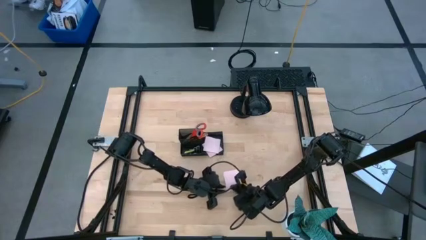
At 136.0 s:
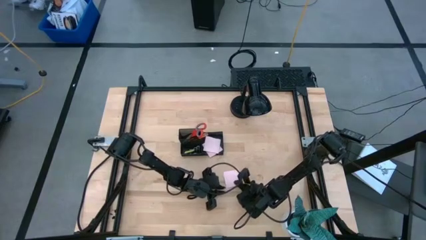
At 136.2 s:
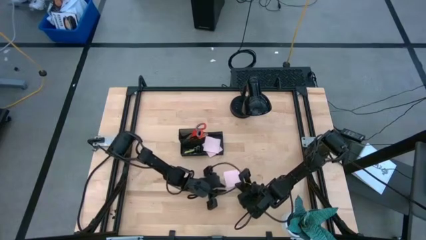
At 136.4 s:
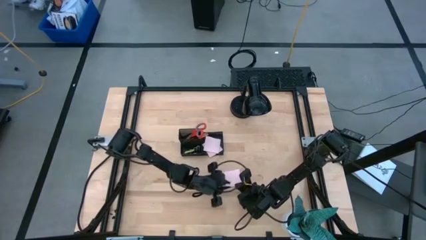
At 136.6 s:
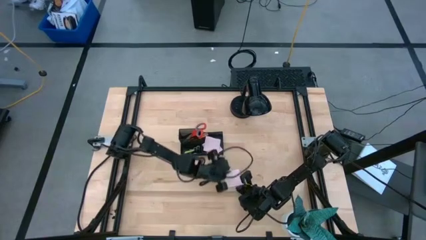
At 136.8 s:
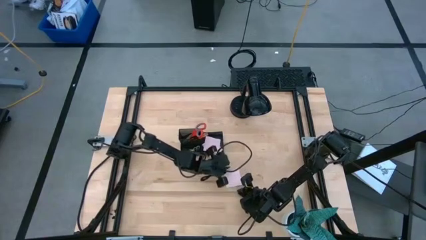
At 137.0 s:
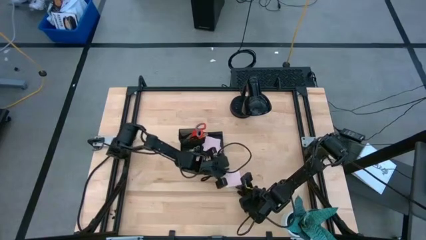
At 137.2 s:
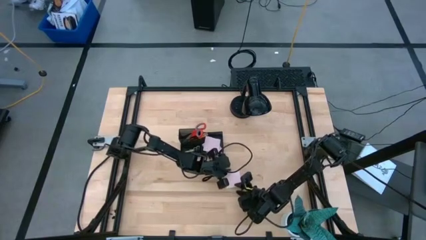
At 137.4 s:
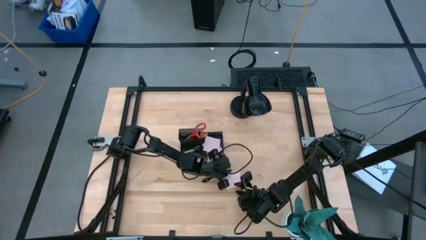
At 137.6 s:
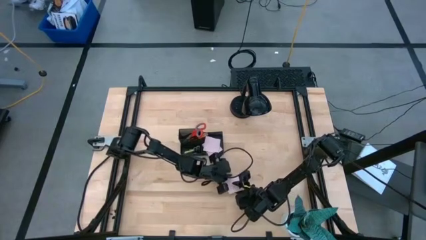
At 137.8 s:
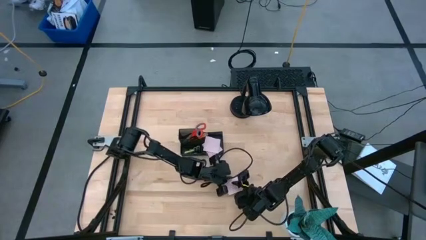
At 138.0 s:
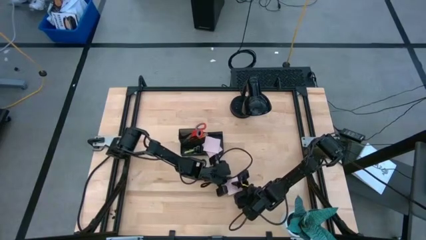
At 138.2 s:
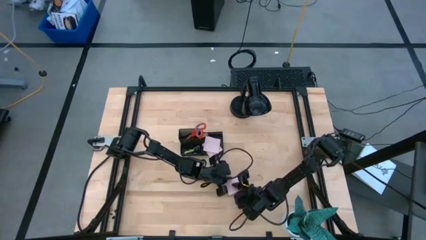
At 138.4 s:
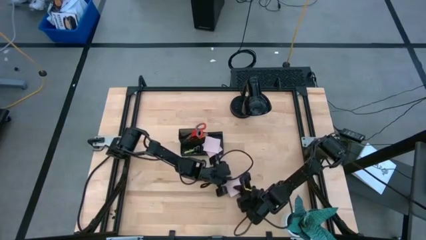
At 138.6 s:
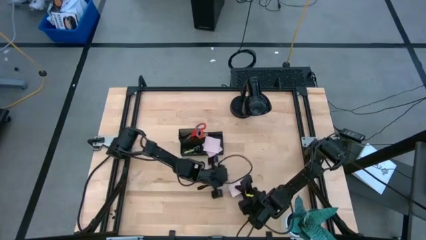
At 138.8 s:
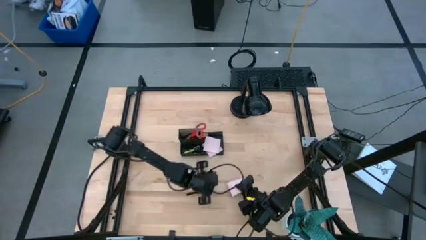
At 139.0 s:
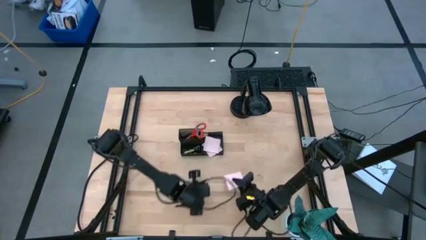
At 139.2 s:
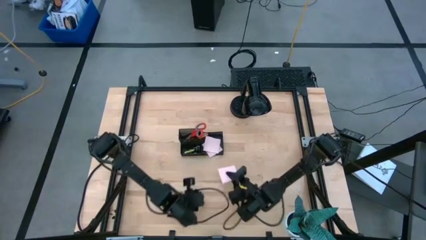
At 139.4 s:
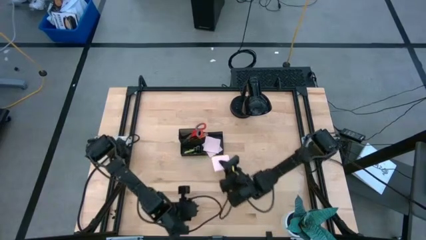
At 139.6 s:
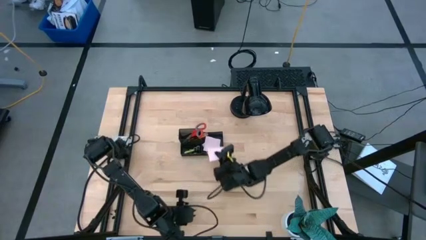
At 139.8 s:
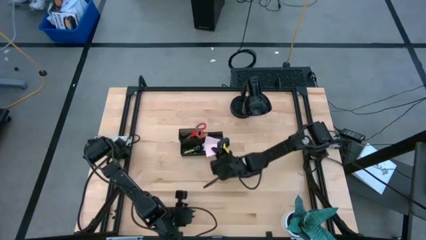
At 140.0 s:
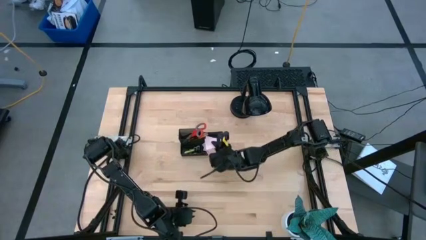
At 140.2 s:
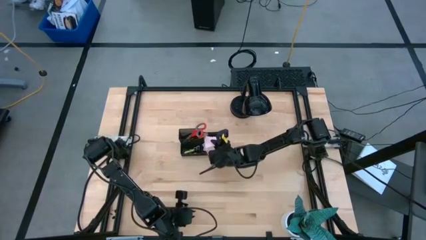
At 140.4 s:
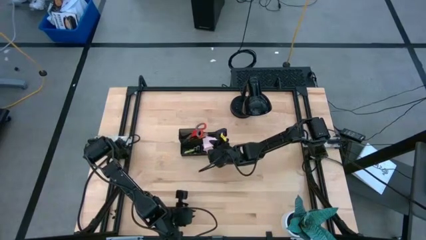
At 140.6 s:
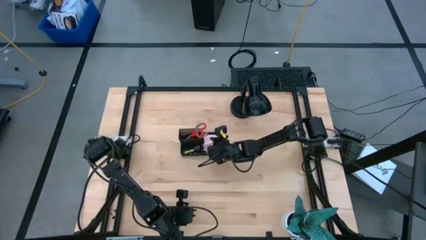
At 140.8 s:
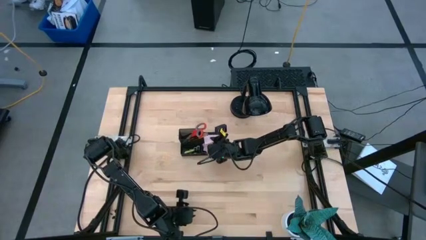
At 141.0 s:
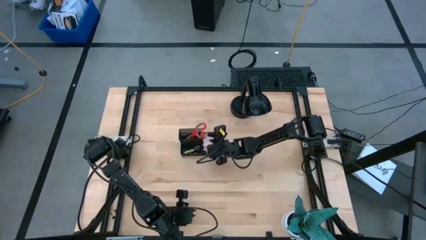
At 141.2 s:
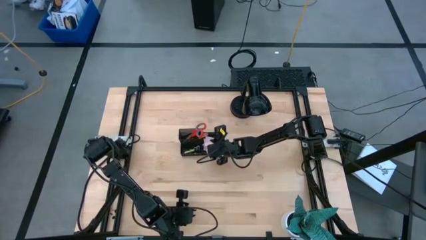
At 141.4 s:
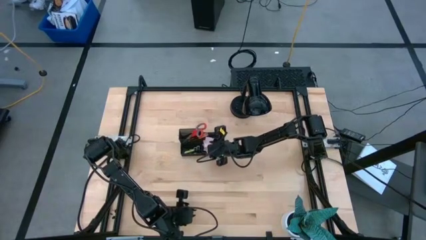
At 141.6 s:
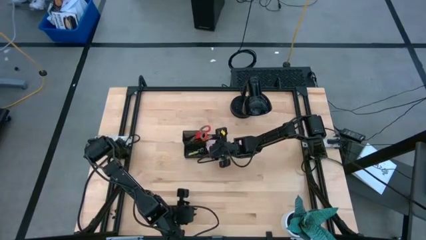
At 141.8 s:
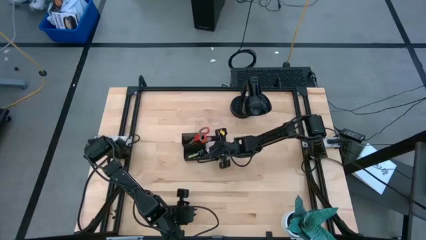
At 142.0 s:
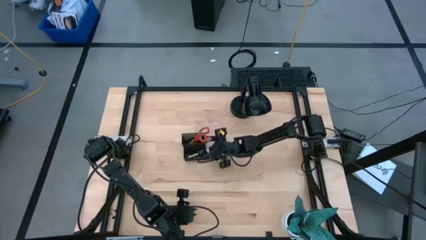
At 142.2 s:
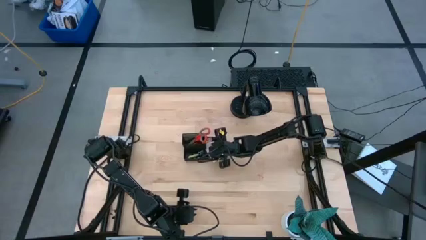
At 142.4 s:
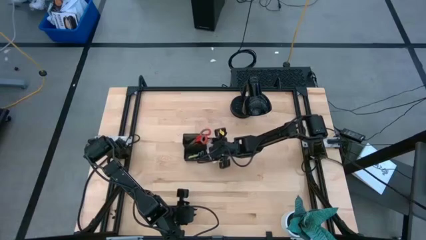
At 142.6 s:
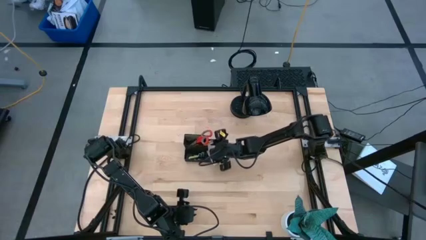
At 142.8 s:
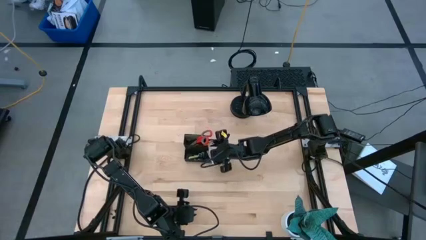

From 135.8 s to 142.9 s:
Task: Pick and place office supplies into organizer
Put the pink sticky notes into the black desk organizer

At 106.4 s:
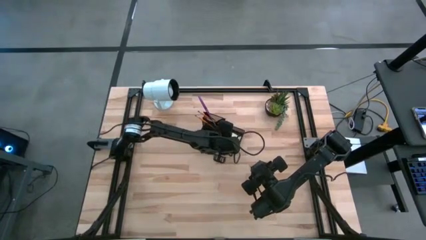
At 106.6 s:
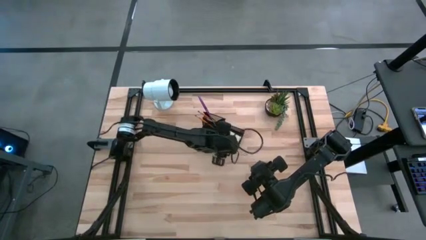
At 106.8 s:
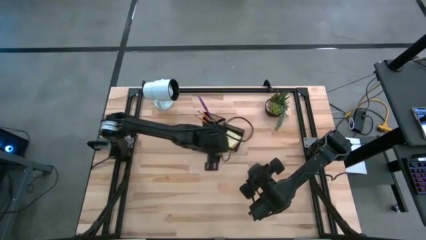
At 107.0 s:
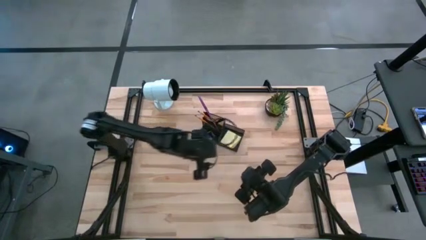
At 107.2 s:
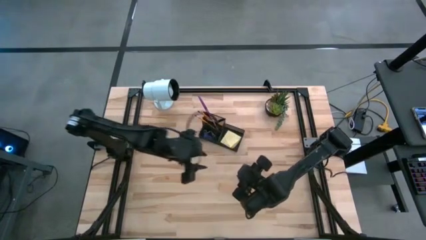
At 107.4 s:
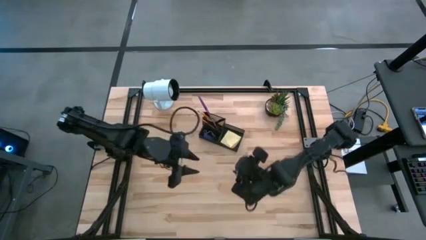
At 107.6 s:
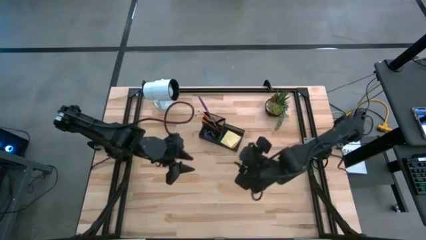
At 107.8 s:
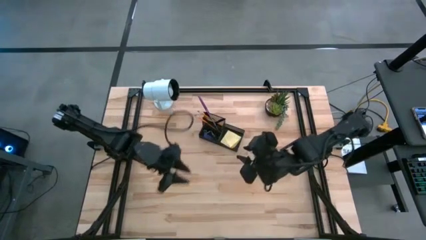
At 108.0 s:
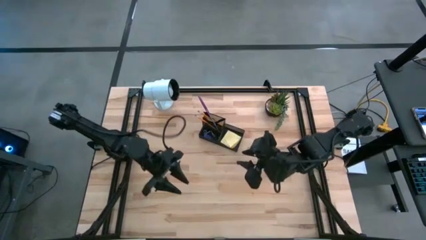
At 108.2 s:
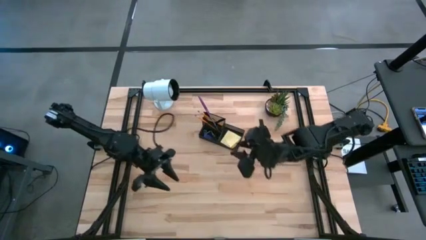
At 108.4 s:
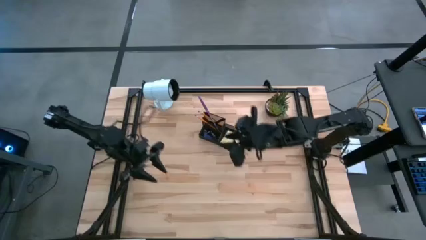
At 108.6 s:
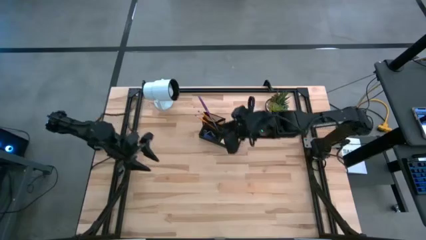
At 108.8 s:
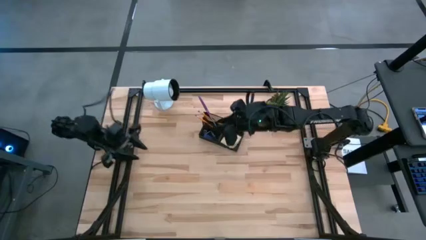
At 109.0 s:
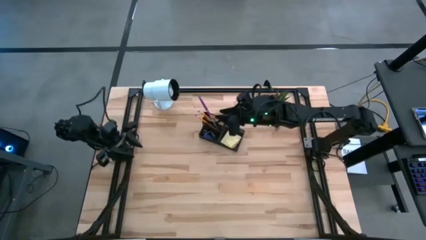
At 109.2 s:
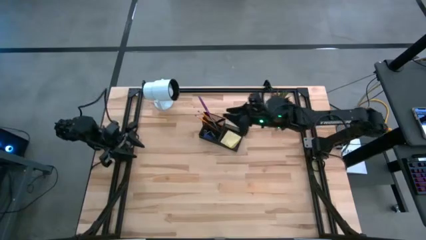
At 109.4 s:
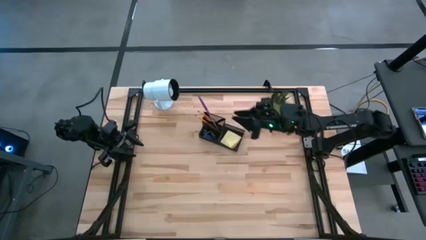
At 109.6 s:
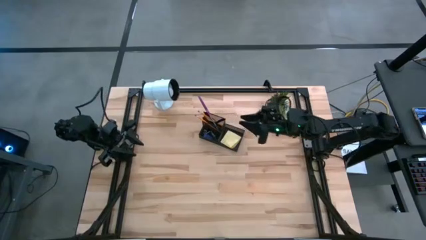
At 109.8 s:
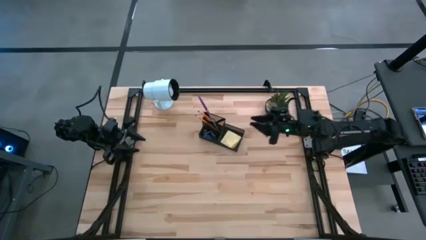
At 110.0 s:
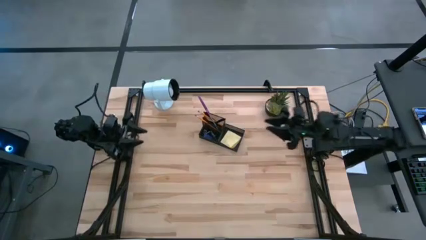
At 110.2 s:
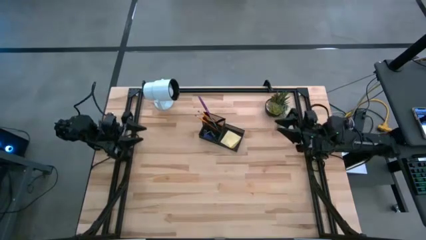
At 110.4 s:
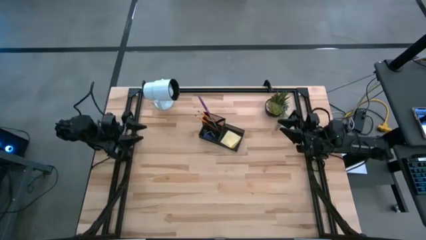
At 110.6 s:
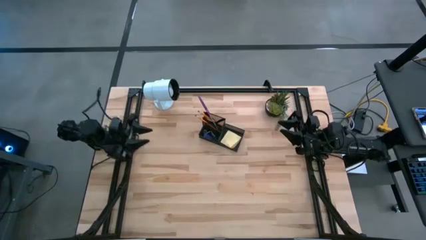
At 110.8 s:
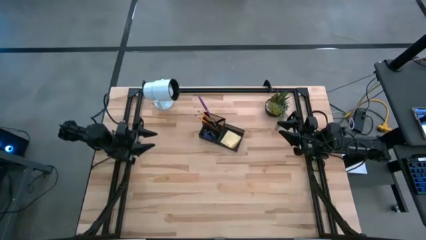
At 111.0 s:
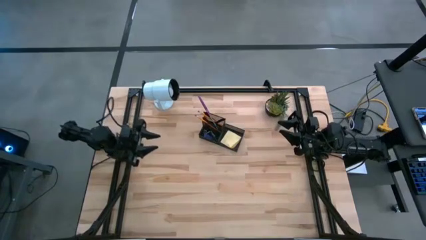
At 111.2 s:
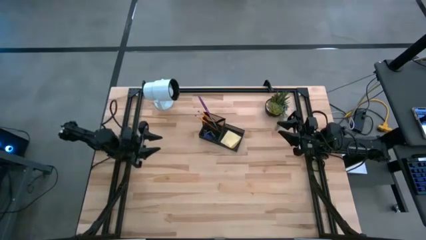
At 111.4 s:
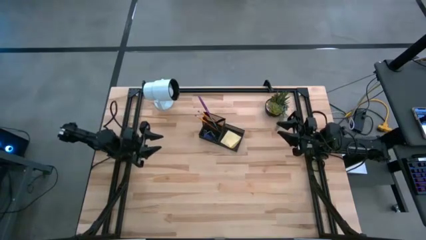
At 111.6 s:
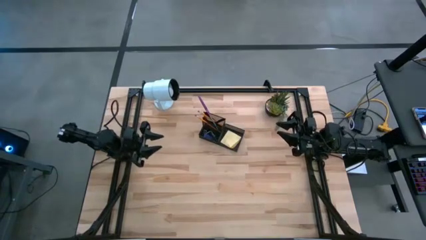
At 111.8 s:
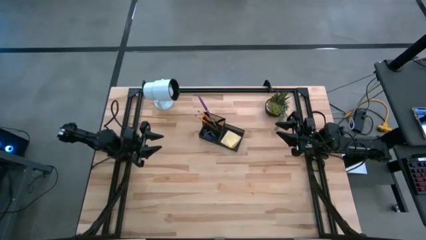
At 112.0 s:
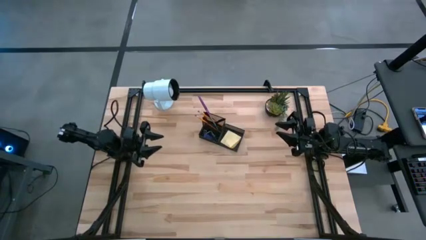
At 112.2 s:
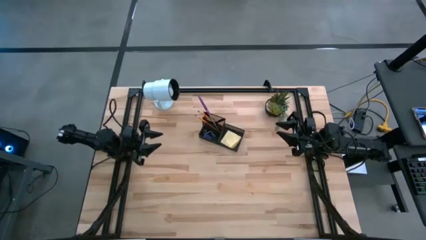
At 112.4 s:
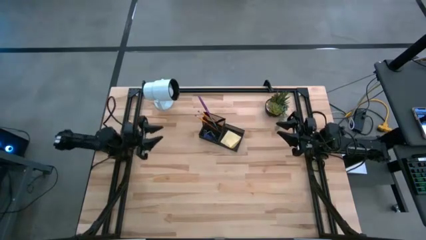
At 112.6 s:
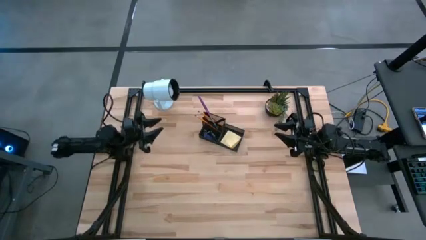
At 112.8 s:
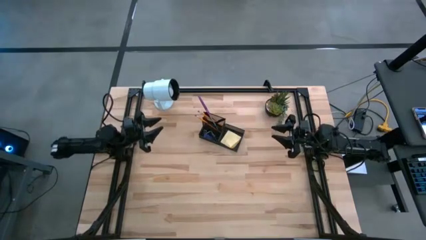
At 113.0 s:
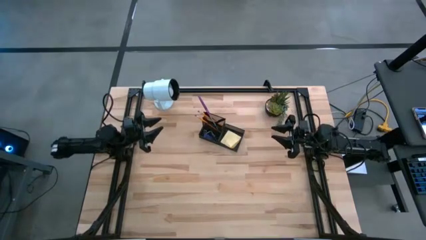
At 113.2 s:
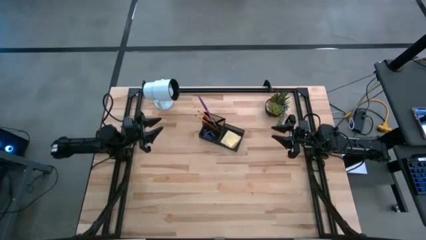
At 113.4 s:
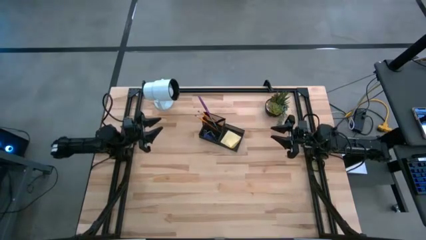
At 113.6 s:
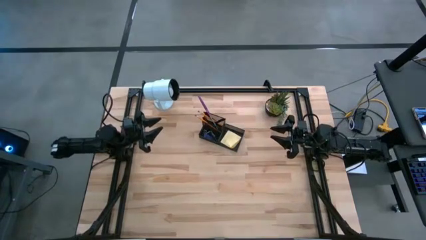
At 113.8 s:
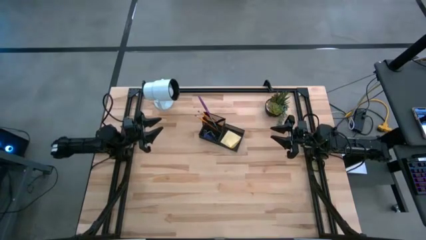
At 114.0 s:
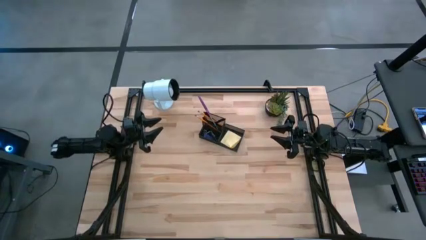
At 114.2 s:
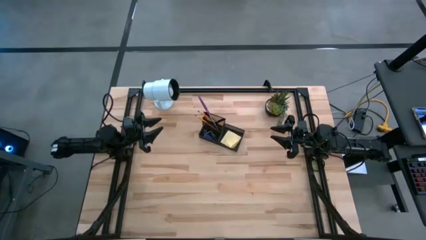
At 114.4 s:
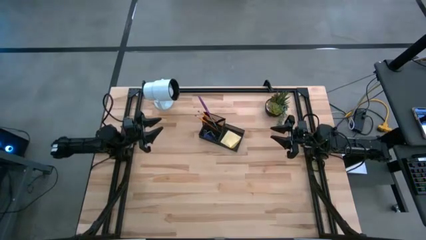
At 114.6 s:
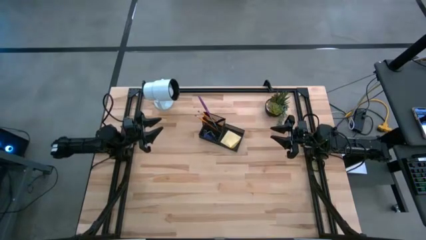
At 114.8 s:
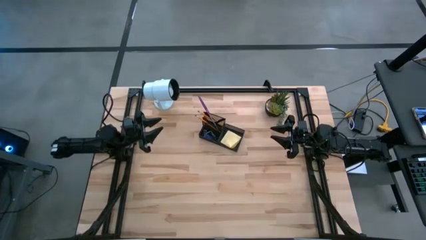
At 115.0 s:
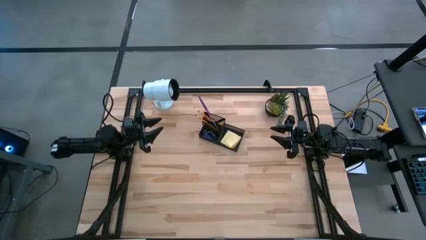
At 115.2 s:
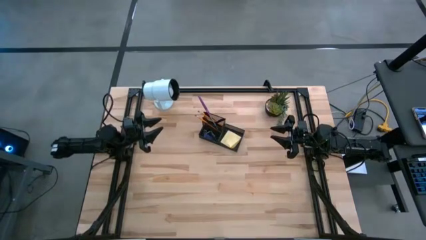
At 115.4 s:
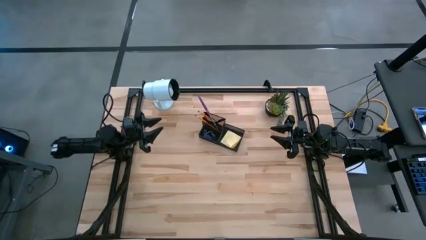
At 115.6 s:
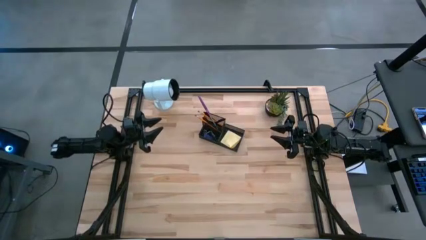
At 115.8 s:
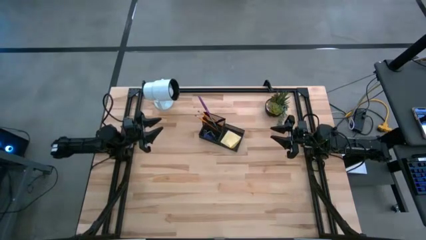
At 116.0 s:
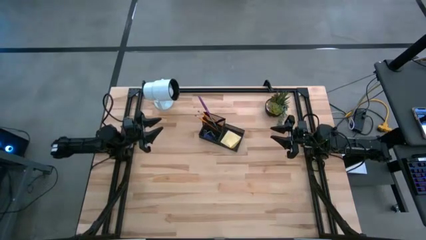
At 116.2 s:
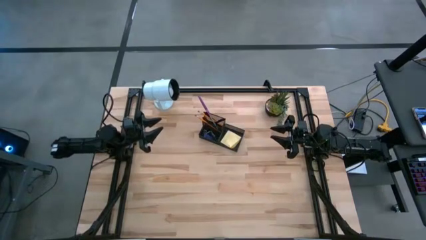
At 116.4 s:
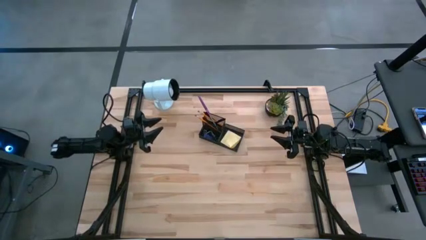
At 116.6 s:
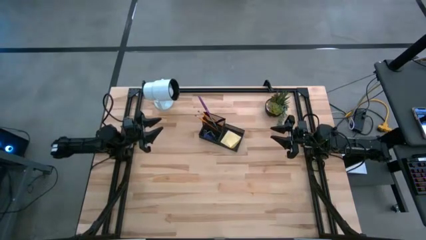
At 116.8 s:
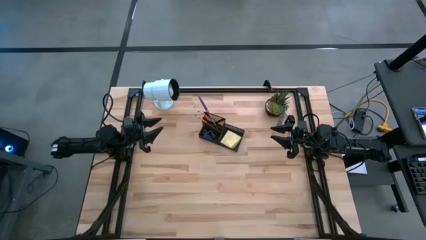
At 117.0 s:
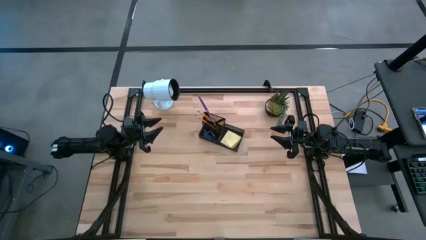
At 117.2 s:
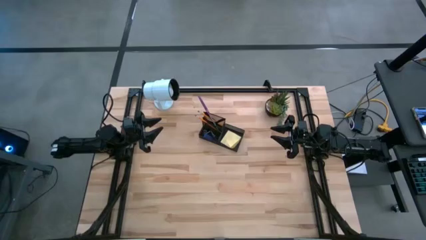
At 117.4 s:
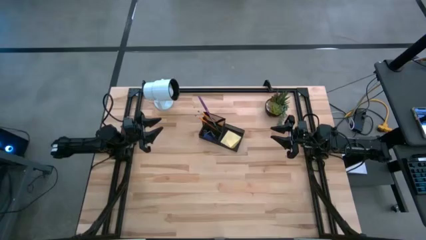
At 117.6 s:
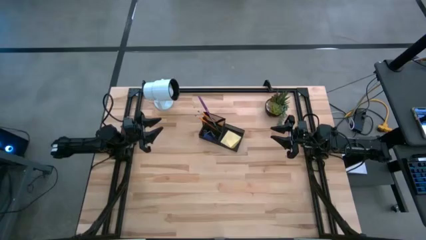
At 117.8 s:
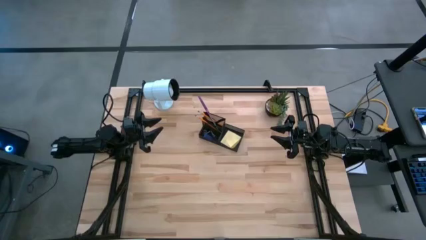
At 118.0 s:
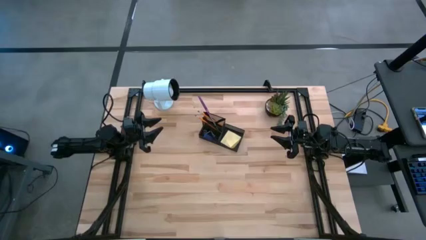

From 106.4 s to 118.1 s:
Task: Pick and place office supplies into organizer
Return to Home Position
